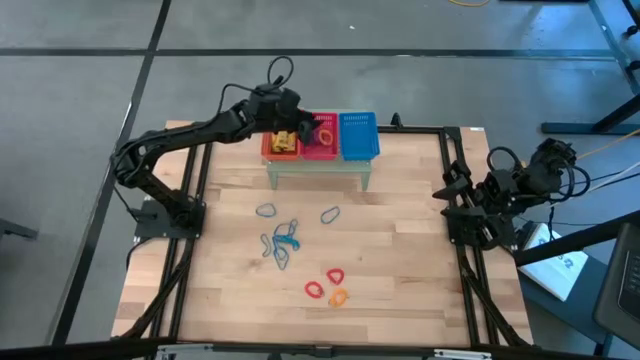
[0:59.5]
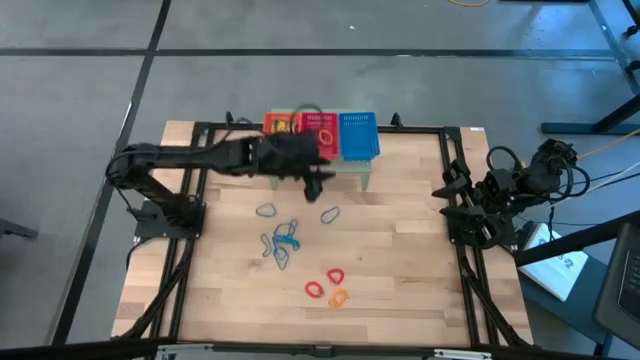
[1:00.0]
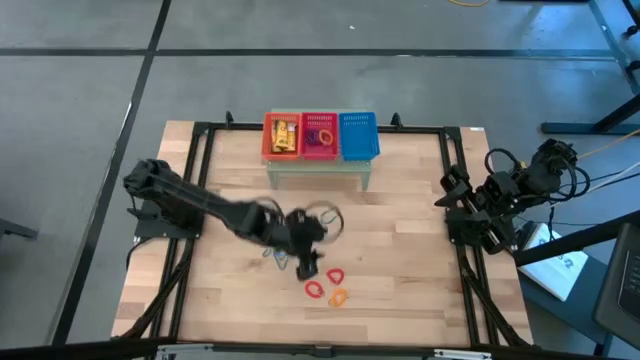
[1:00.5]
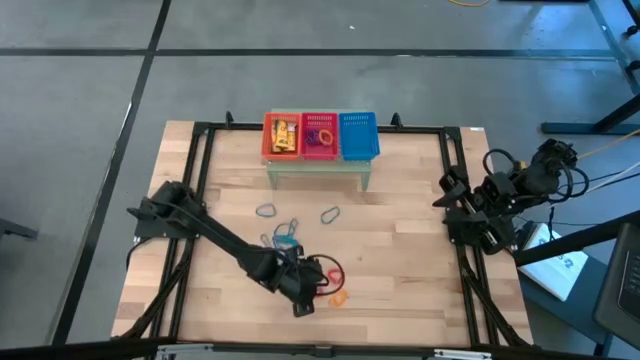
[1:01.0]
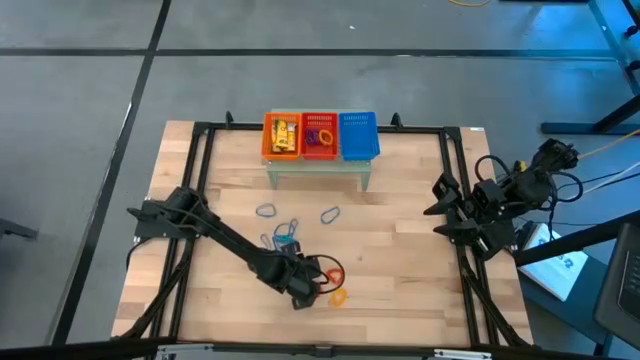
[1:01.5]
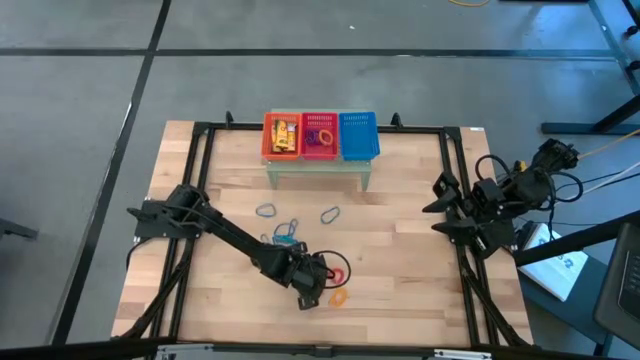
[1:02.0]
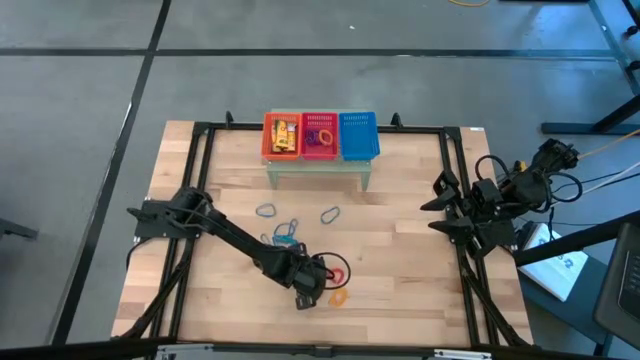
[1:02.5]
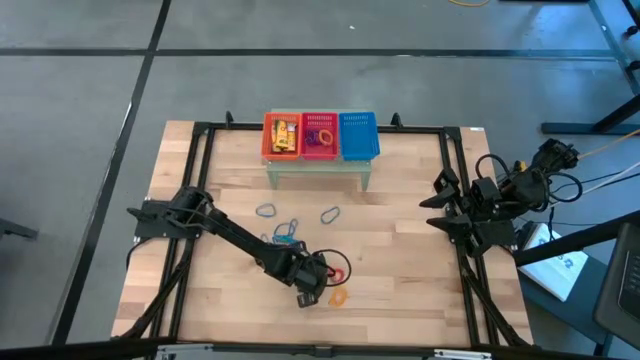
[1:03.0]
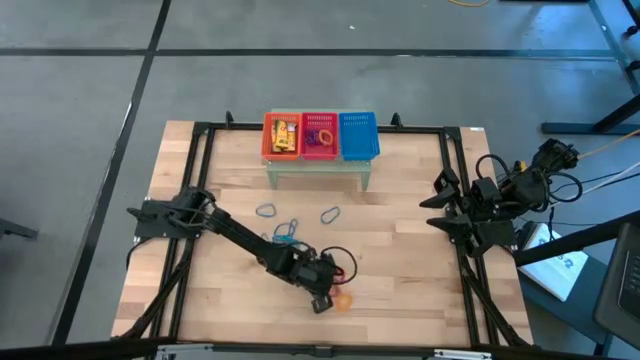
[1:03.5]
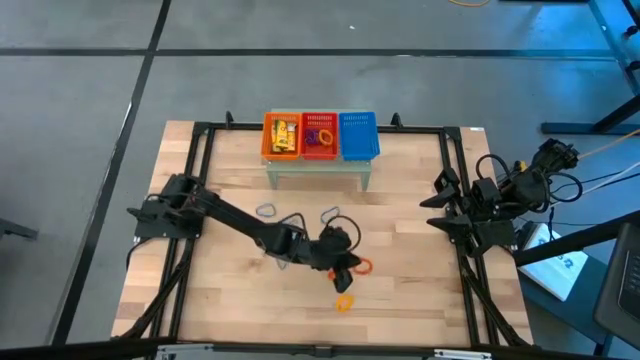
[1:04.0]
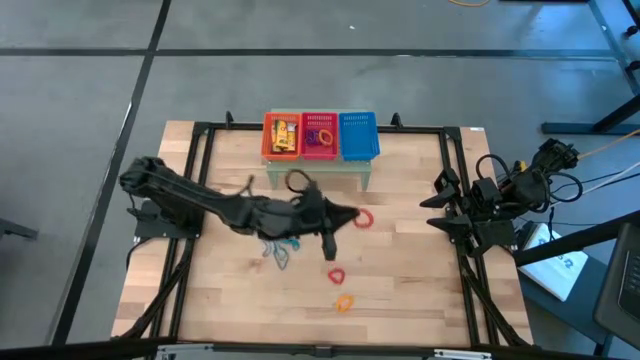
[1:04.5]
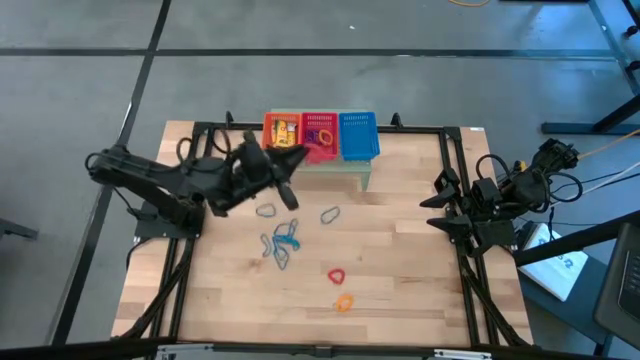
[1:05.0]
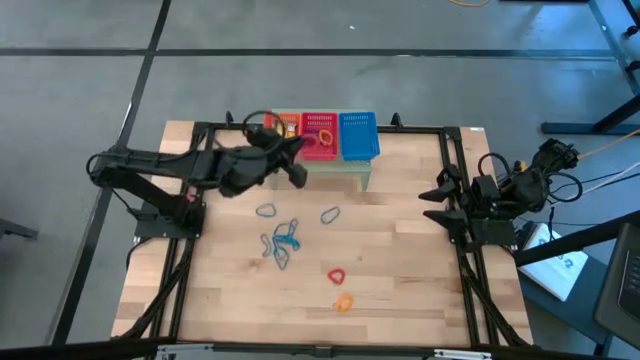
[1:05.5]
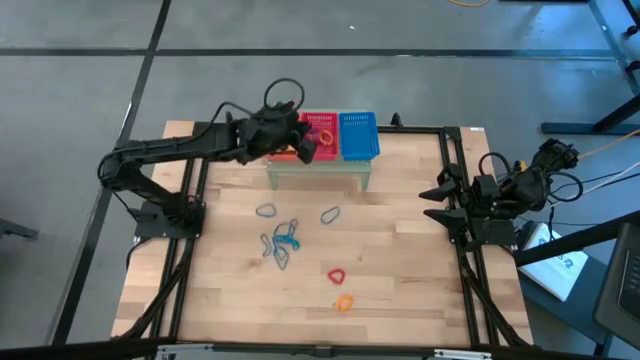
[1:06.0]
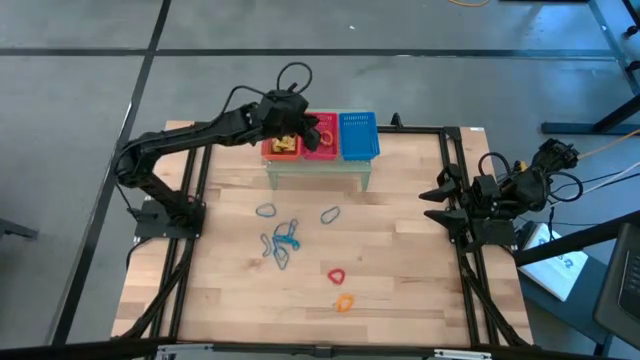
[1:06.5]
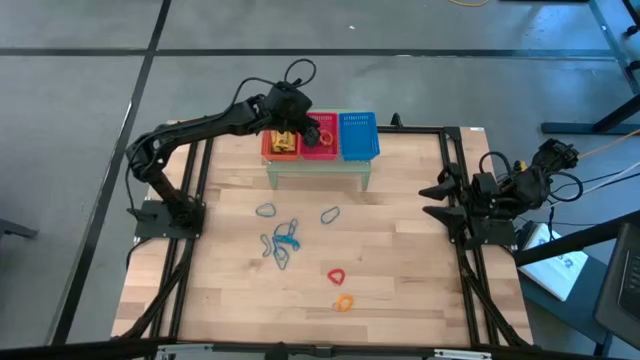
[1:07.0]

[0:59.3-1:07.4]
Task: Pick & Place Office Desk Supplies
Put the orange spring keychain into the red bin on the shelf

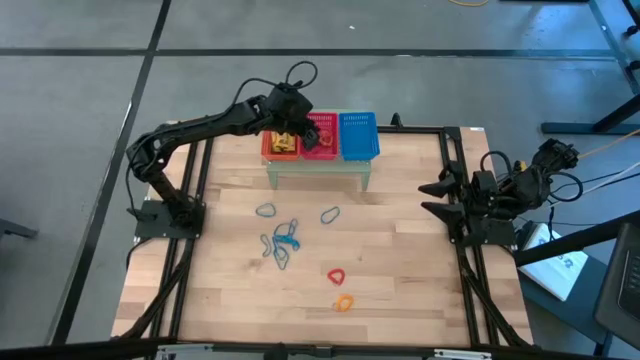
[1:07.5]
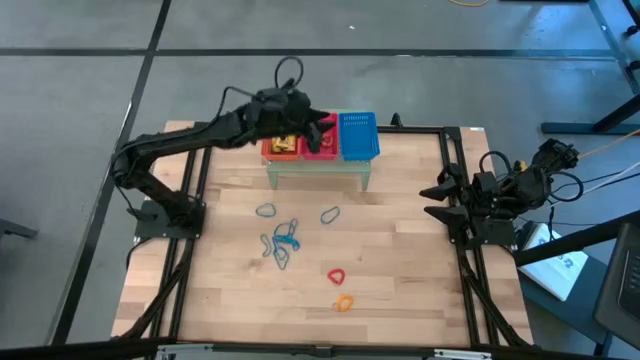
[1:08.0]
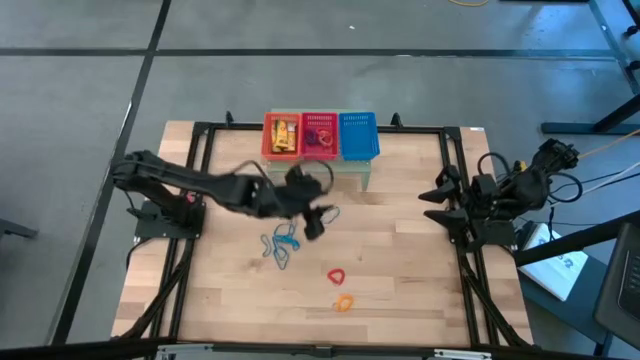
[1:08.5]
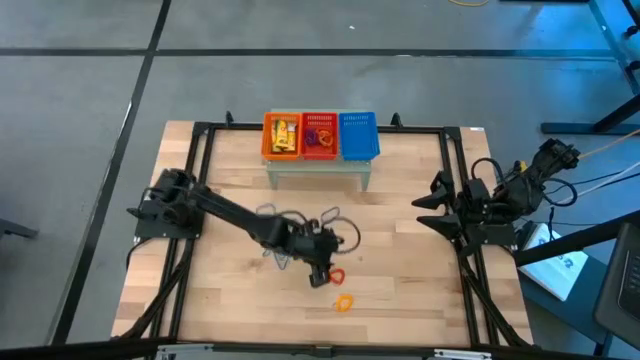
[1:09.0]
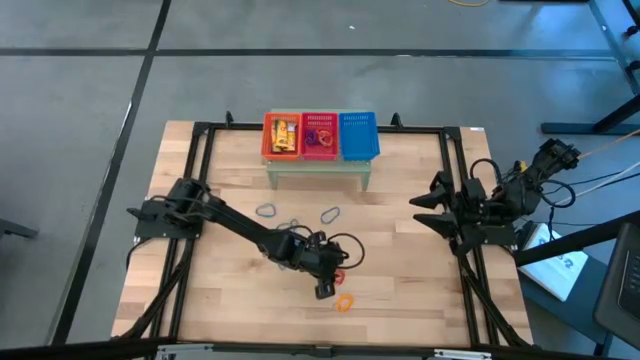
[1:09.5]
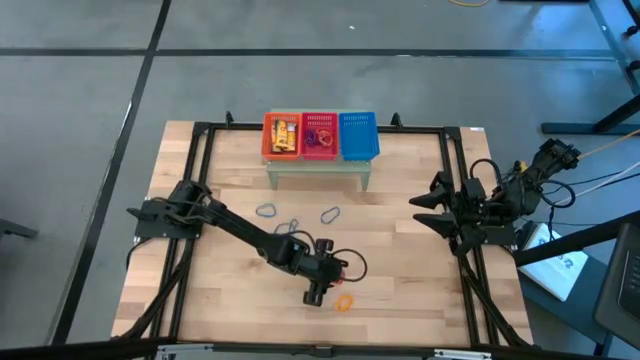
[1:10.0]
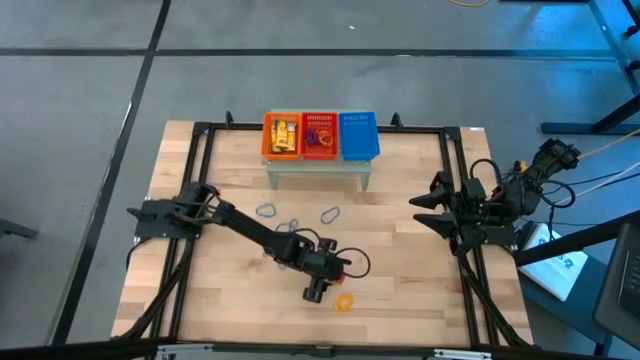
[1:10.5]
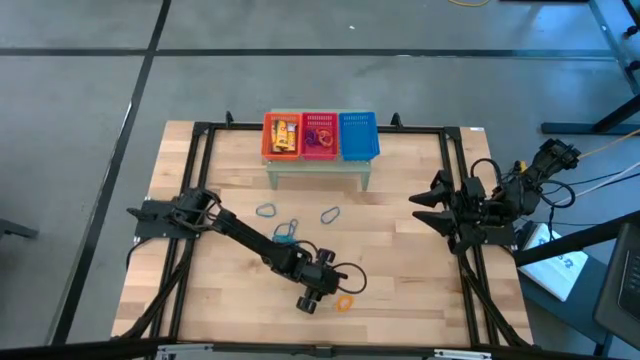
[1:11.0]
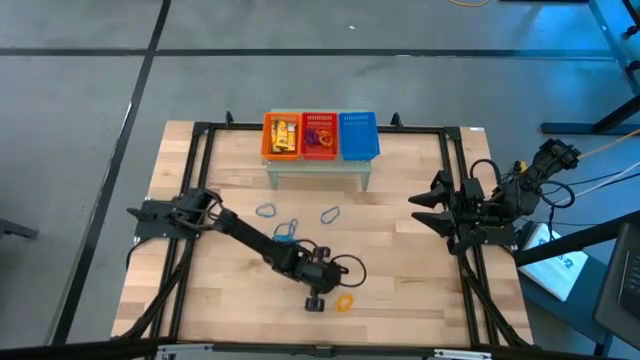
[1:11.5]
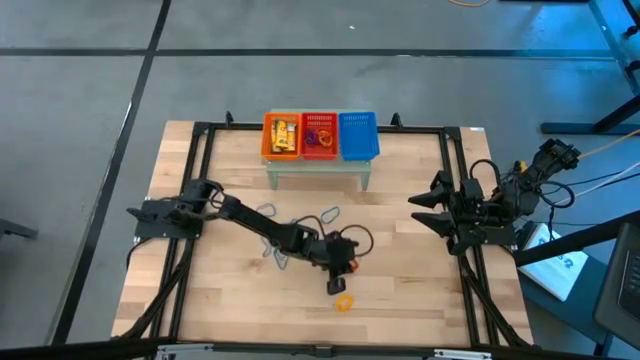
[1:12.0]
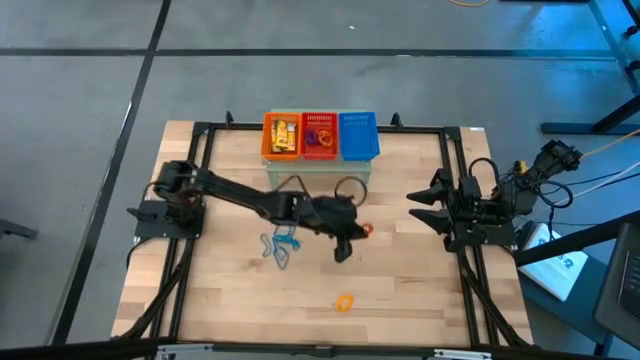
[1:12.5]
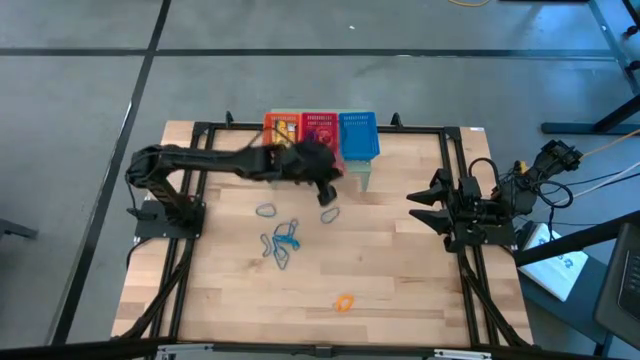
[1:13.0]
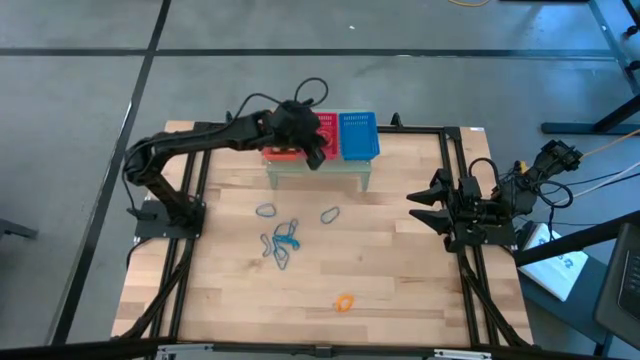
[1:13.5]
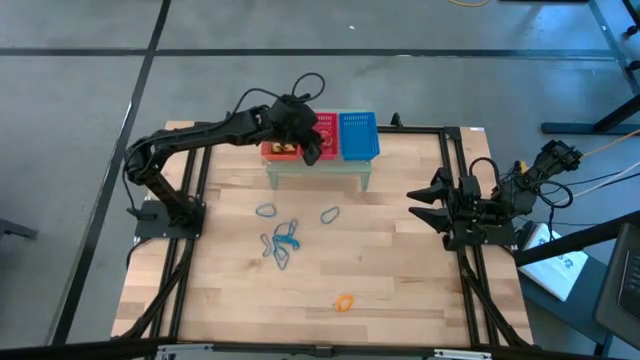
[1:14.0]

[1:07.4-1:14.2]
Put the orange spring keychain into the red bin on the shelf

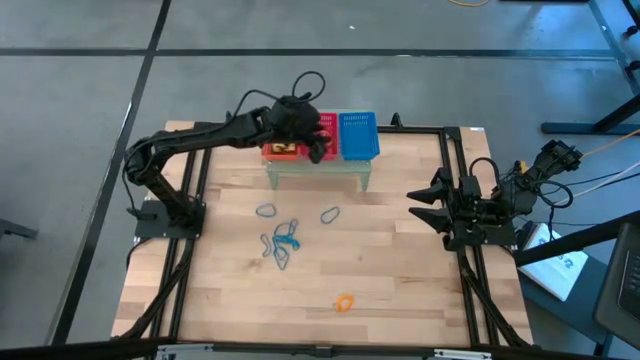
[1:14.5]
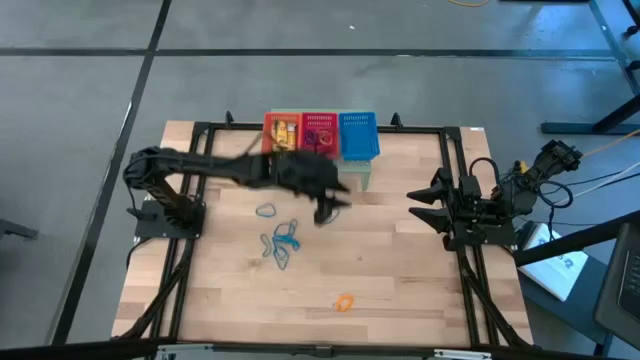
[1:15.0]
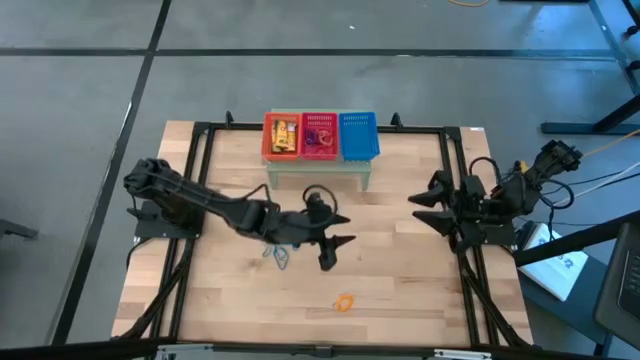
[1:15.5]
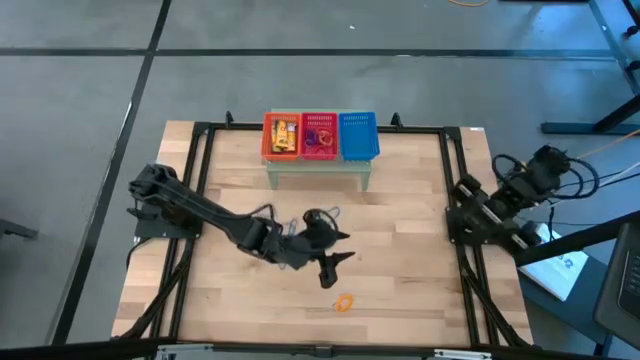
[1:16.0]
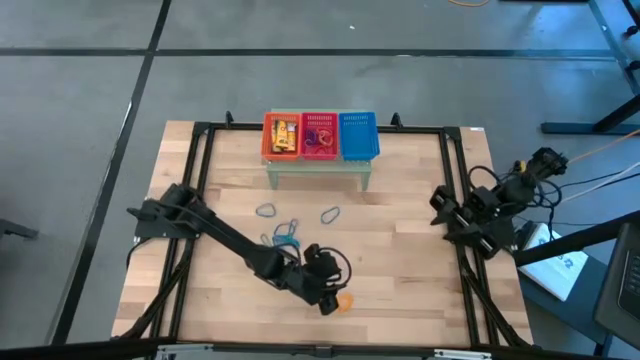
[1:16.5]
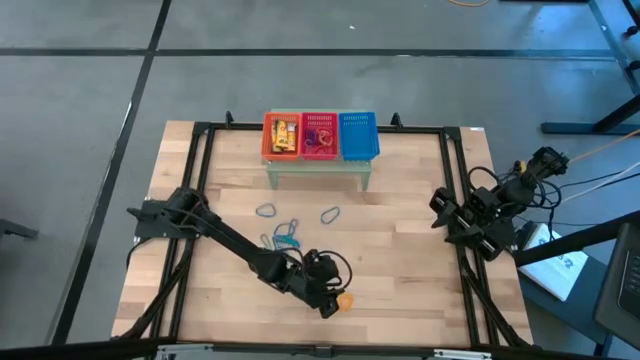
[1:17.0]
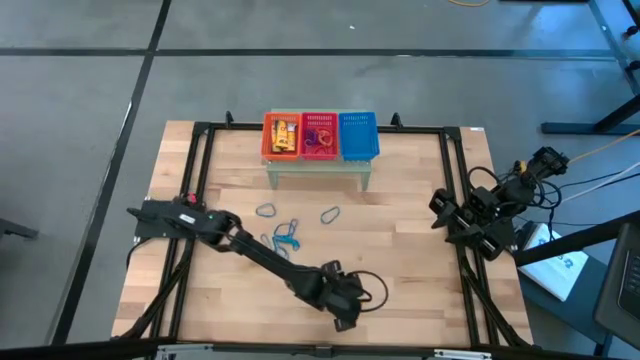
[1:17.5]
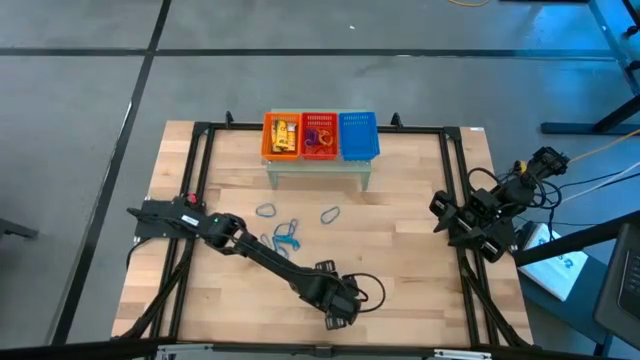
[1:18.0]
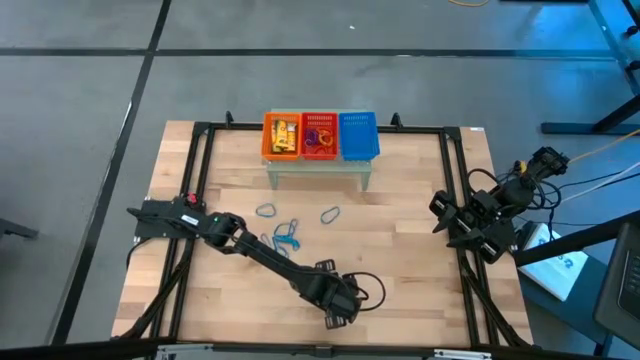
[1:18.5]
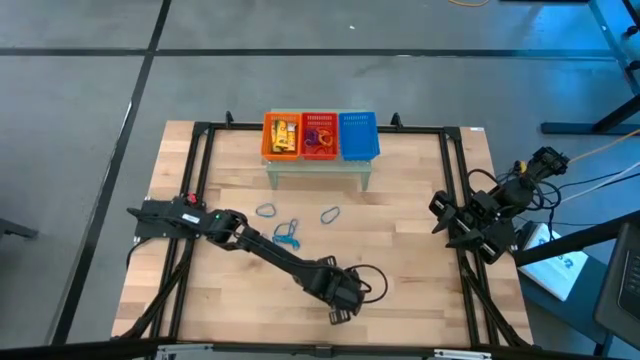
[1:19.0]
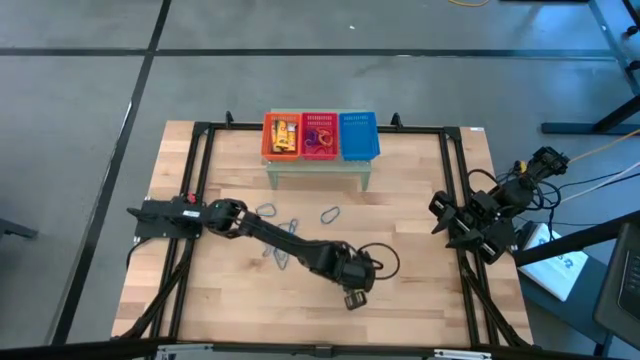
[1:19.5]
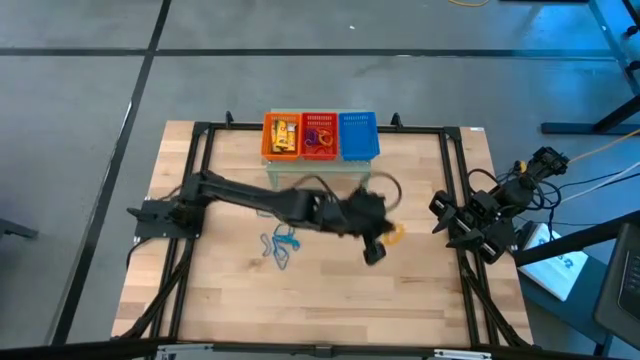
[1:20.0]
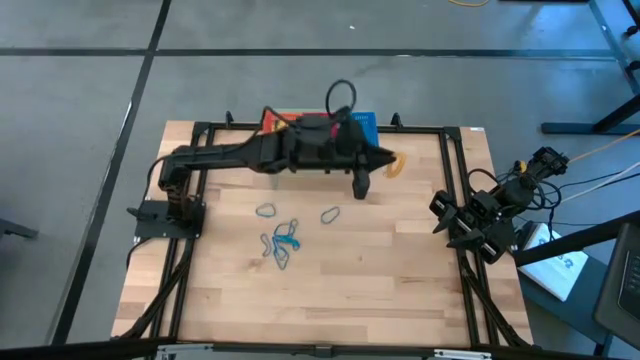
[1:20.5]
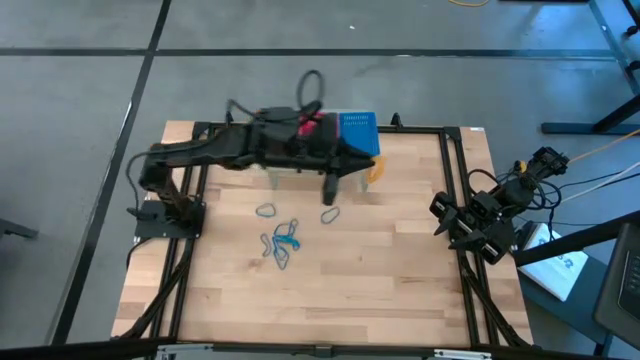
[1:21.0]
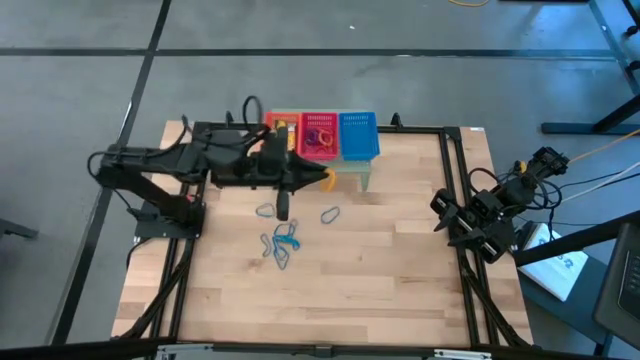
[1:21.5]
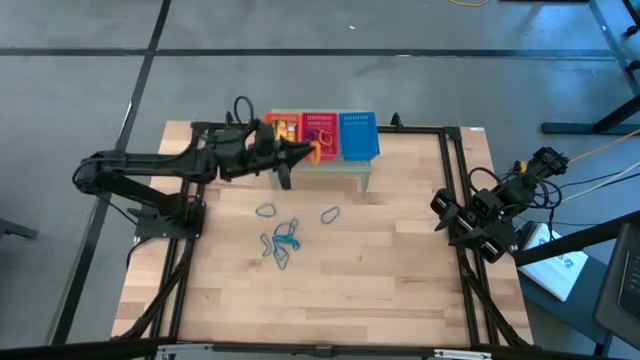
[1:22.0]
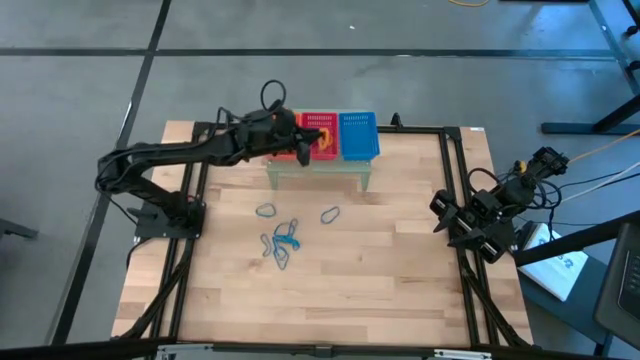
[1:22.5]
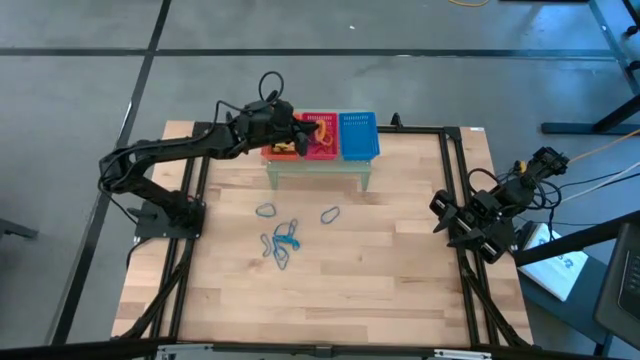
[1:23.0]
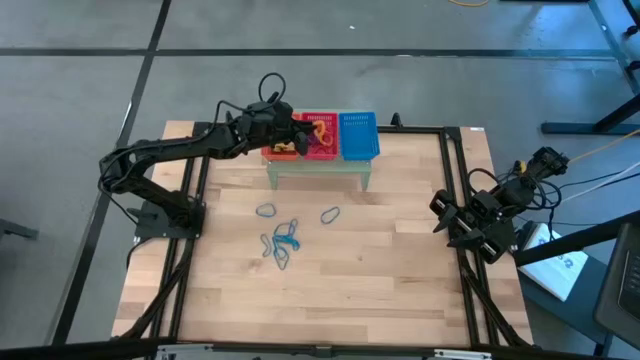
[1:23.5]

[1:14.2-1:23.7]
Put the yellow spring keychain into the red bin on the shelf
